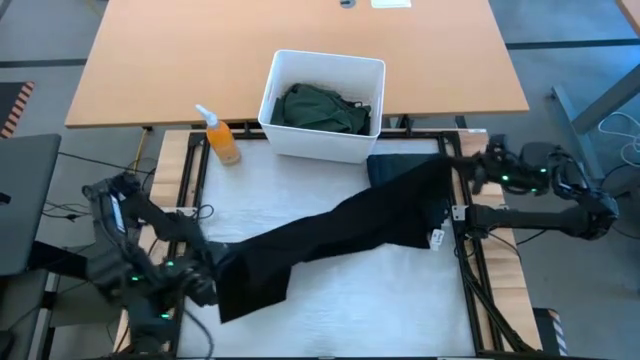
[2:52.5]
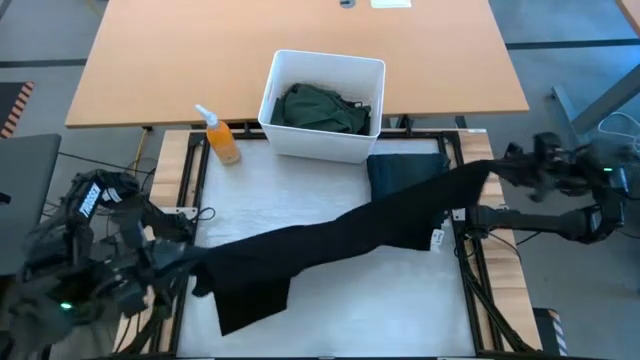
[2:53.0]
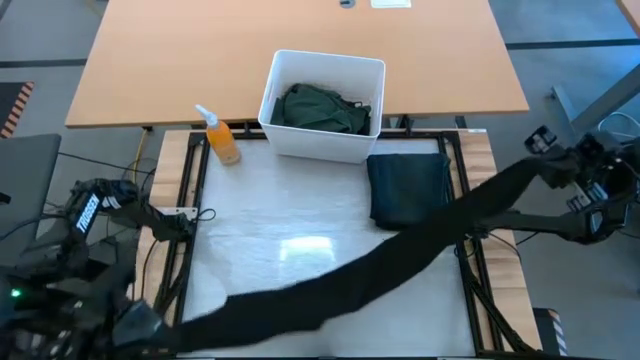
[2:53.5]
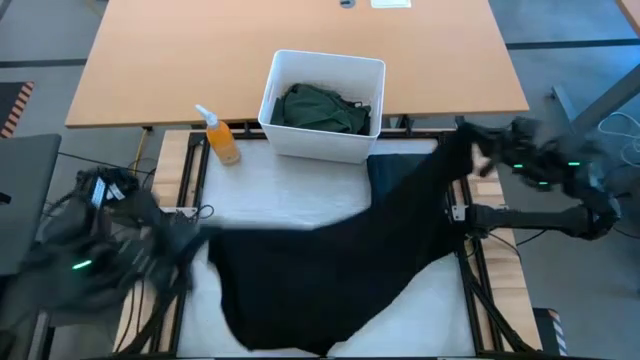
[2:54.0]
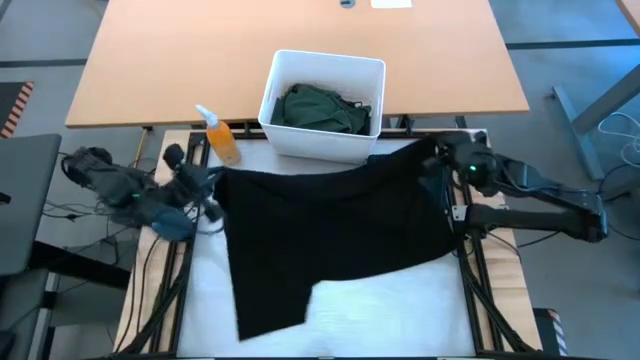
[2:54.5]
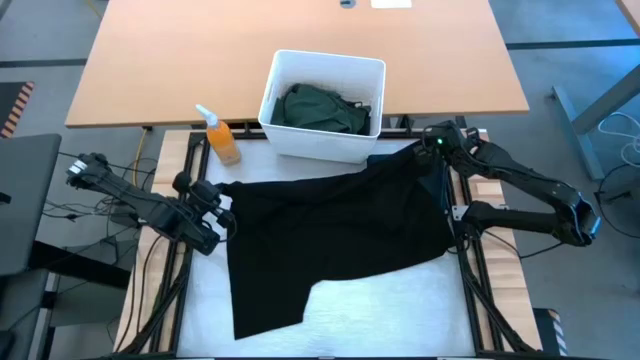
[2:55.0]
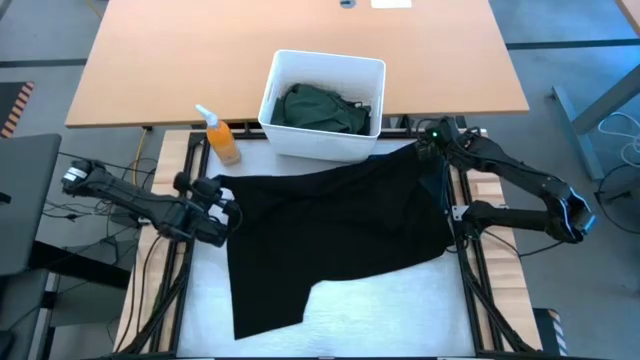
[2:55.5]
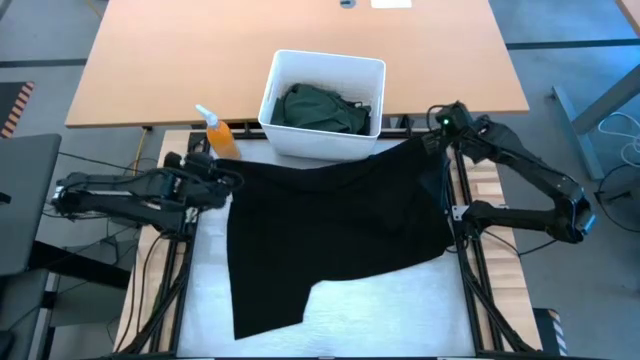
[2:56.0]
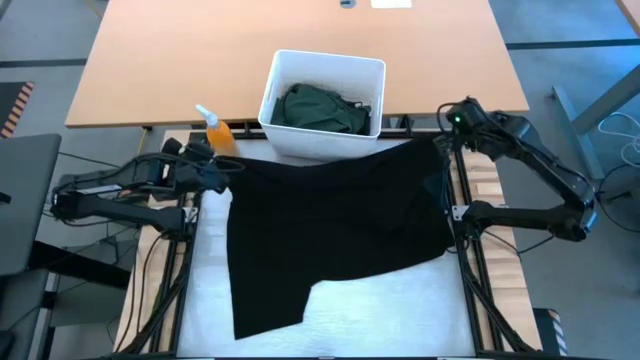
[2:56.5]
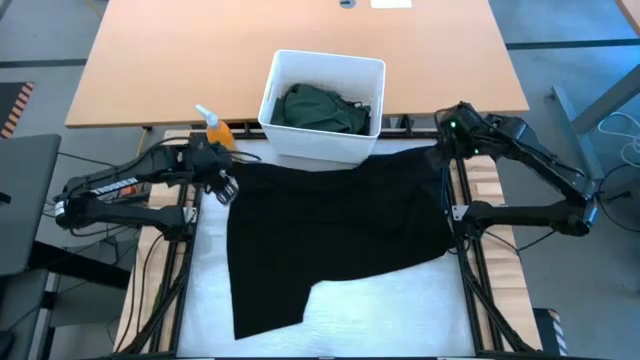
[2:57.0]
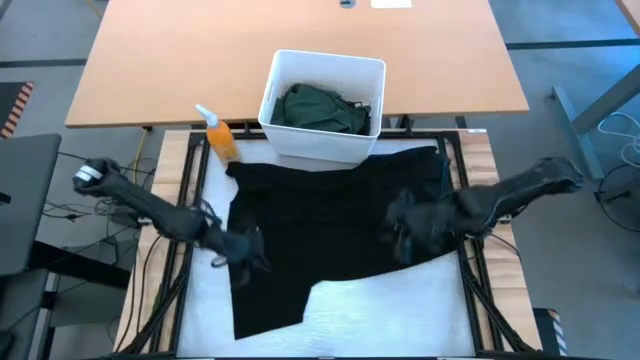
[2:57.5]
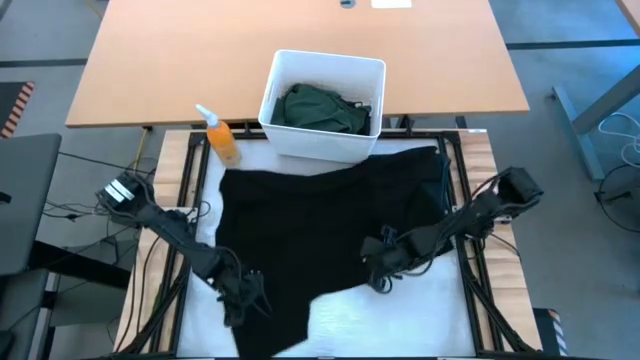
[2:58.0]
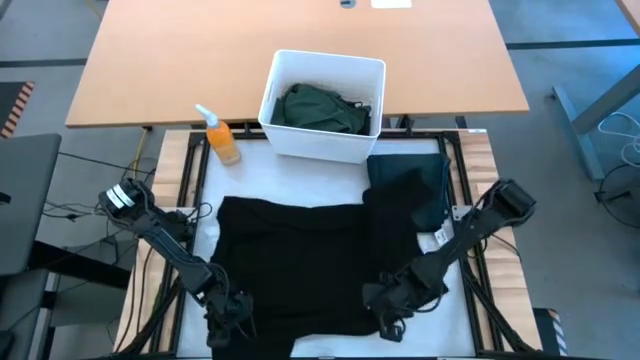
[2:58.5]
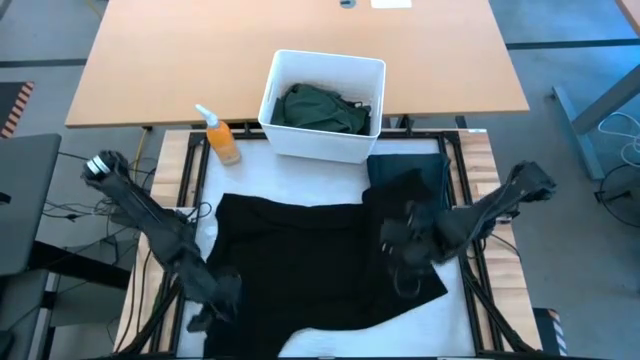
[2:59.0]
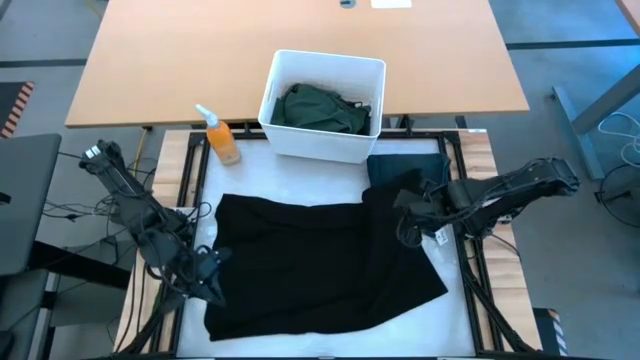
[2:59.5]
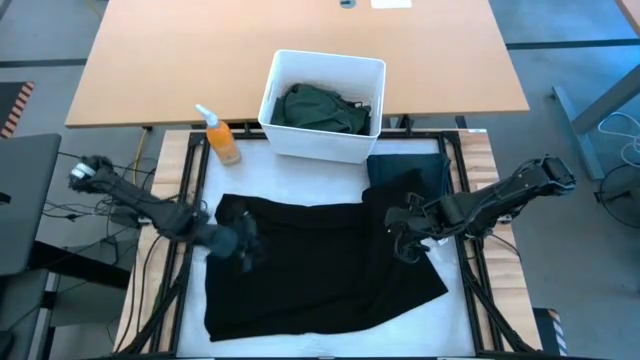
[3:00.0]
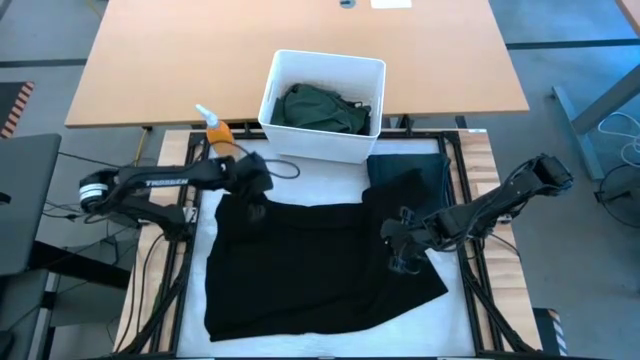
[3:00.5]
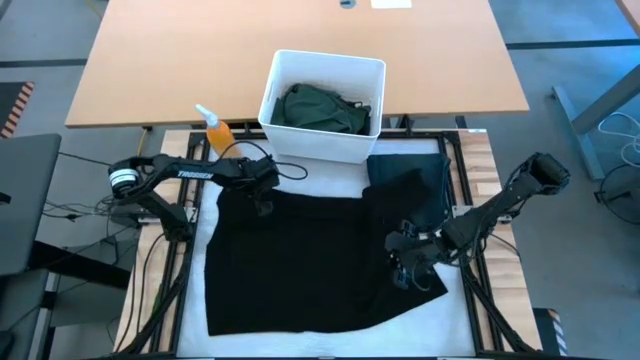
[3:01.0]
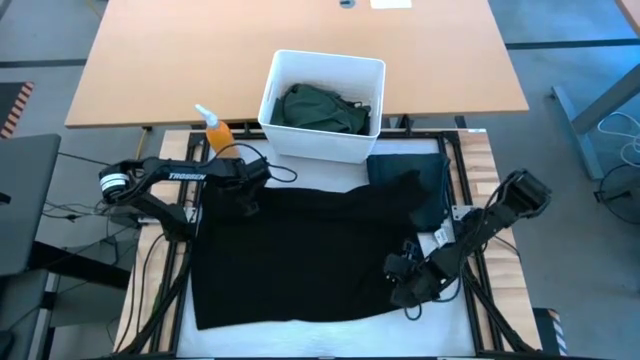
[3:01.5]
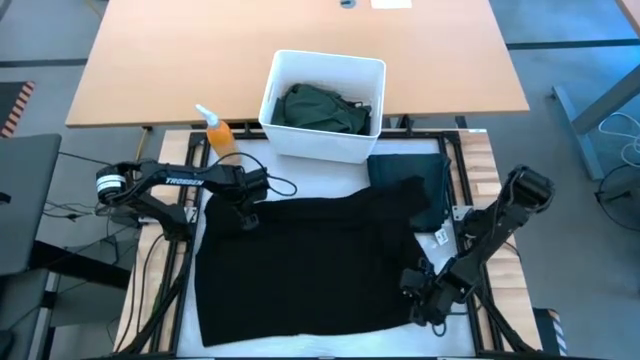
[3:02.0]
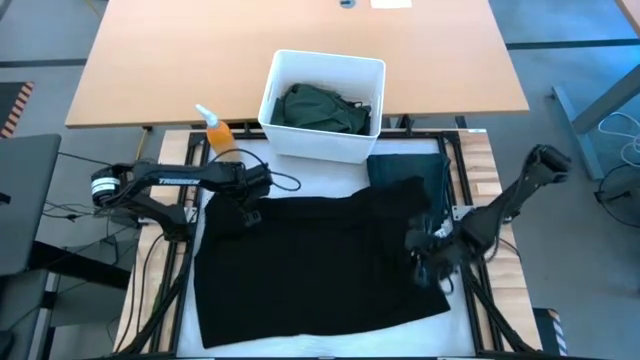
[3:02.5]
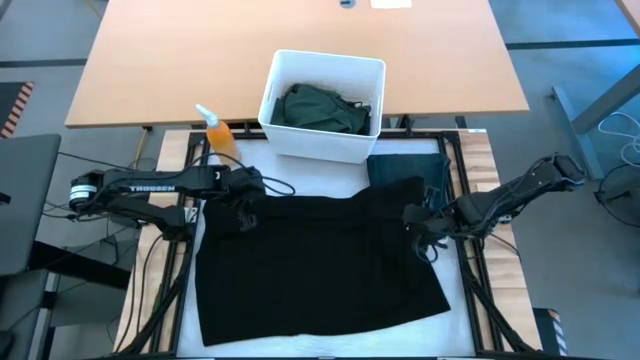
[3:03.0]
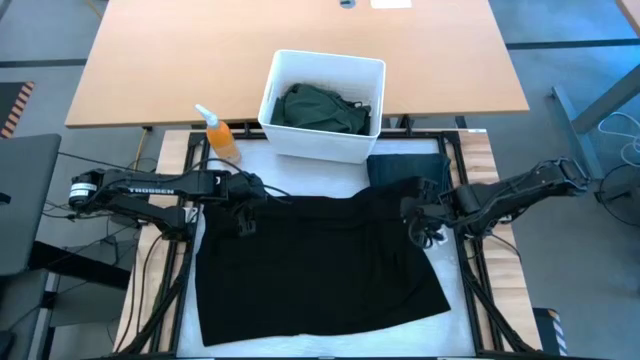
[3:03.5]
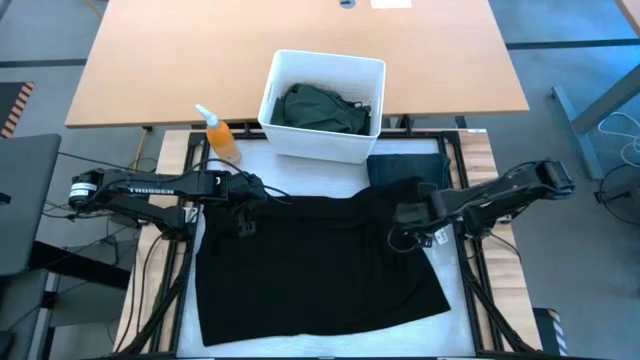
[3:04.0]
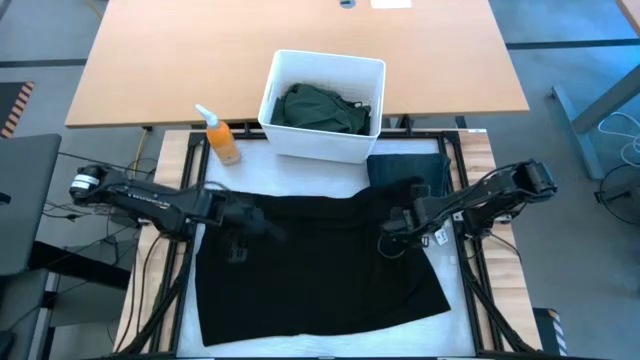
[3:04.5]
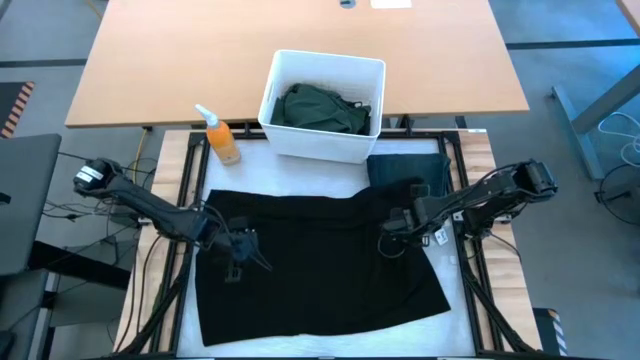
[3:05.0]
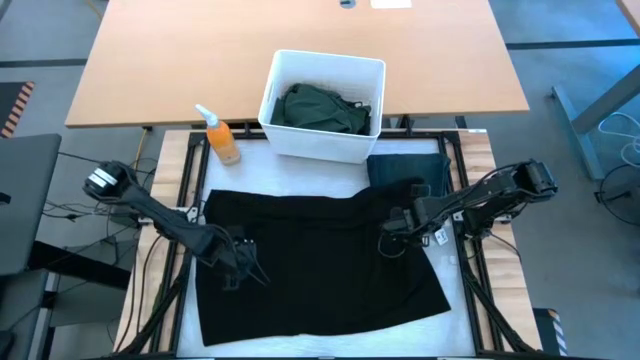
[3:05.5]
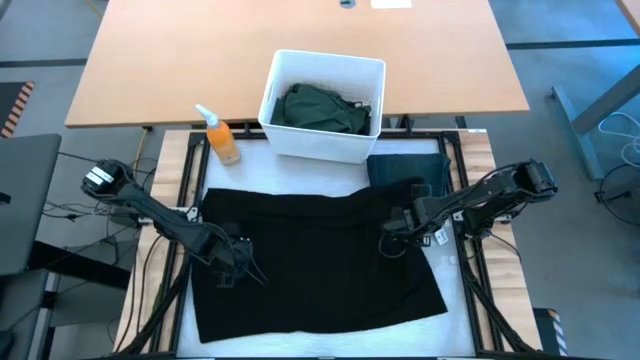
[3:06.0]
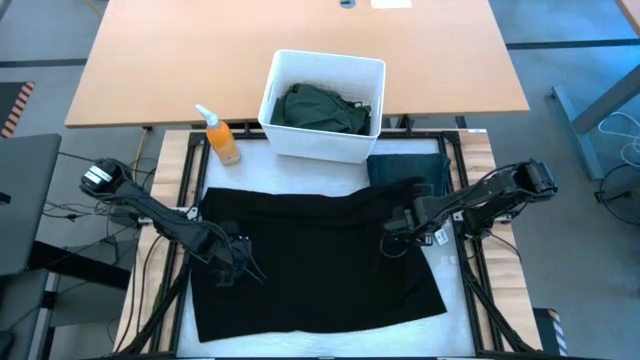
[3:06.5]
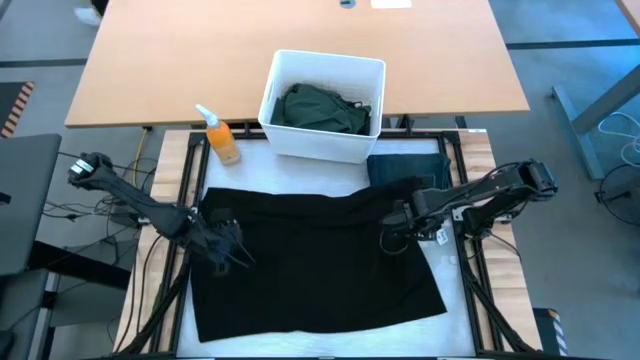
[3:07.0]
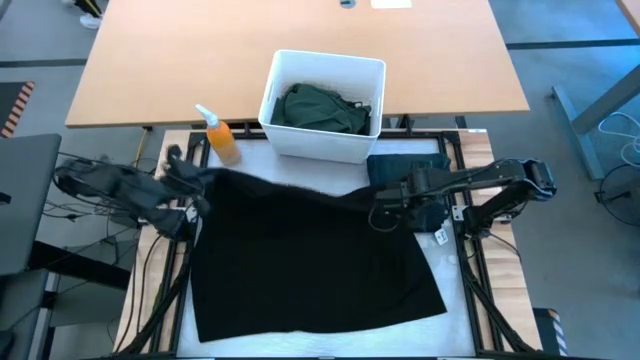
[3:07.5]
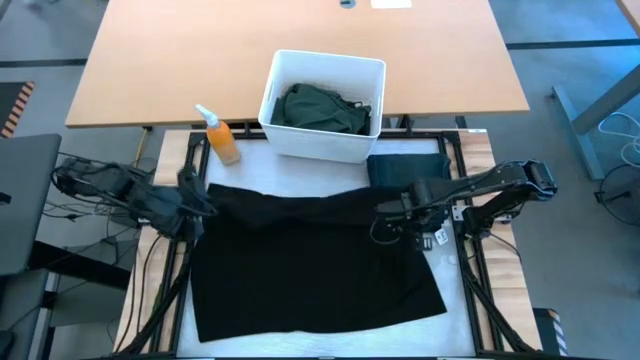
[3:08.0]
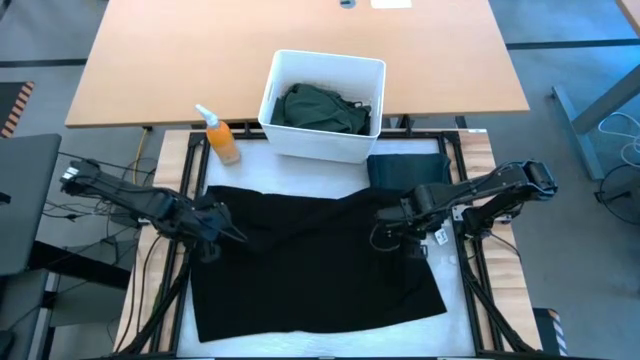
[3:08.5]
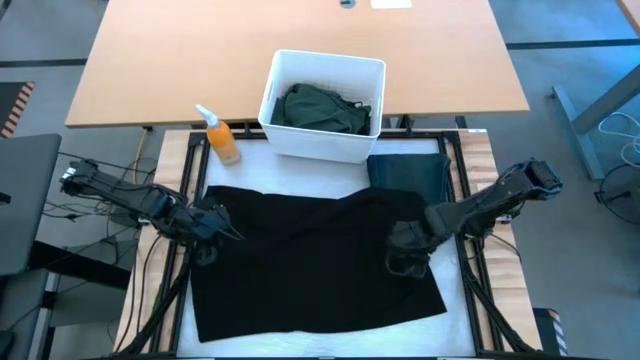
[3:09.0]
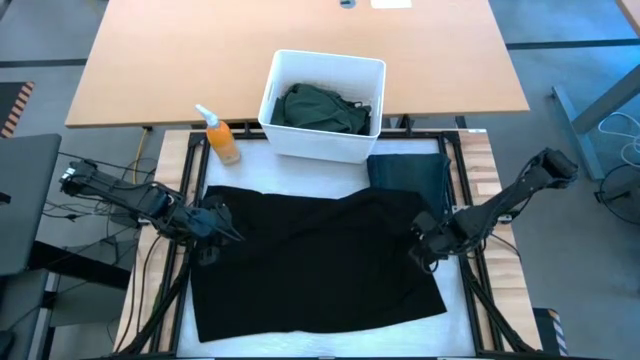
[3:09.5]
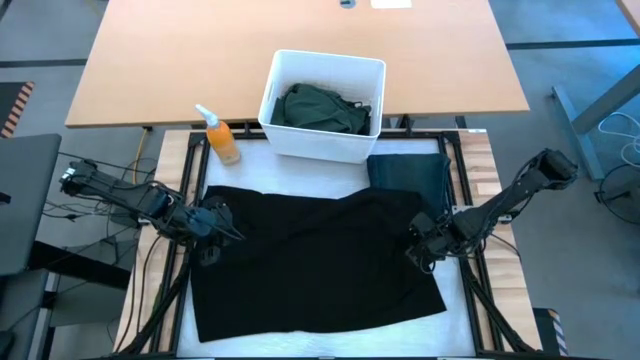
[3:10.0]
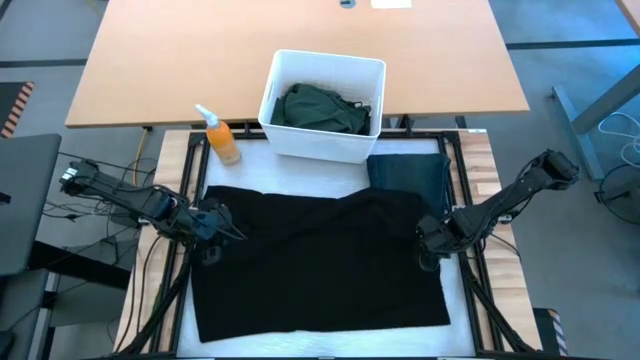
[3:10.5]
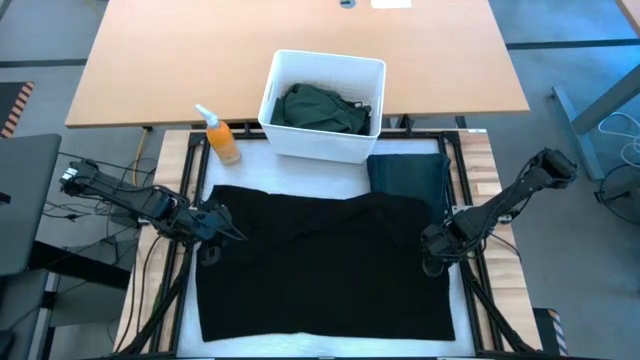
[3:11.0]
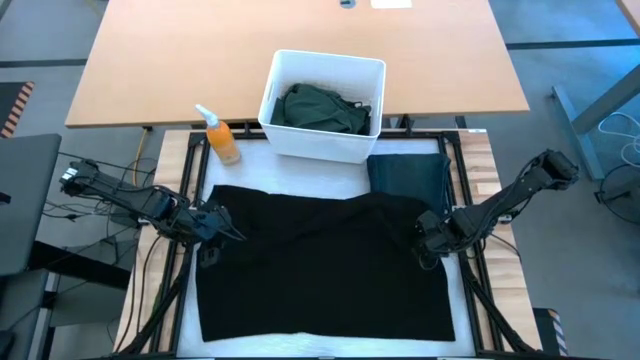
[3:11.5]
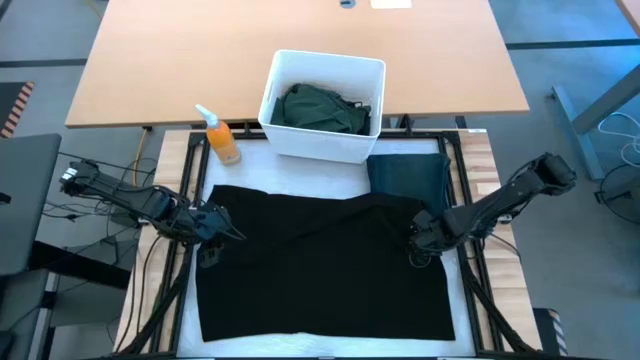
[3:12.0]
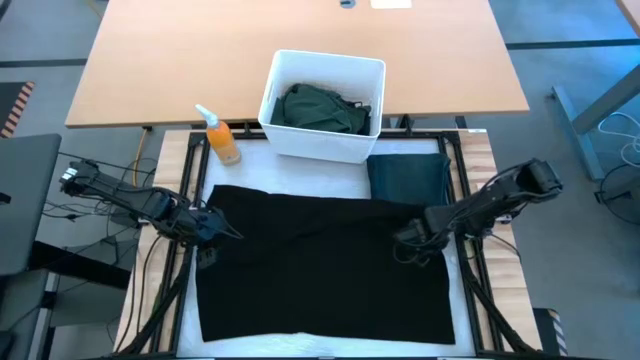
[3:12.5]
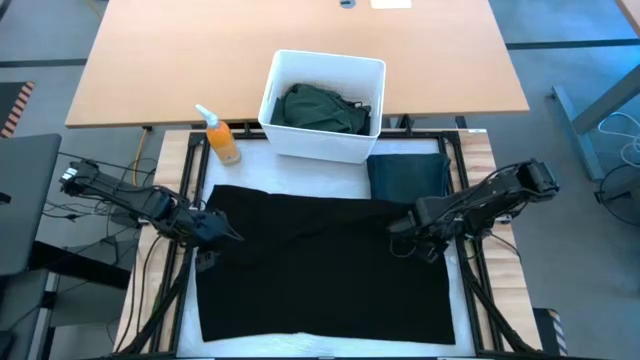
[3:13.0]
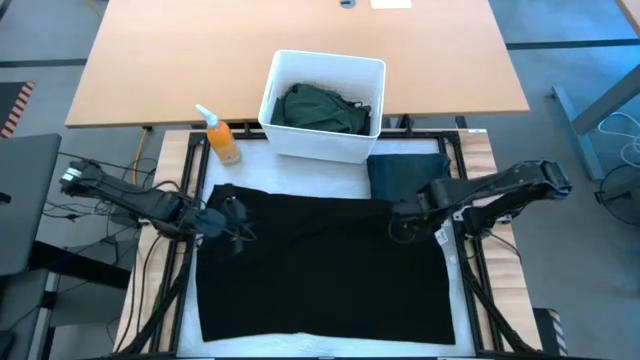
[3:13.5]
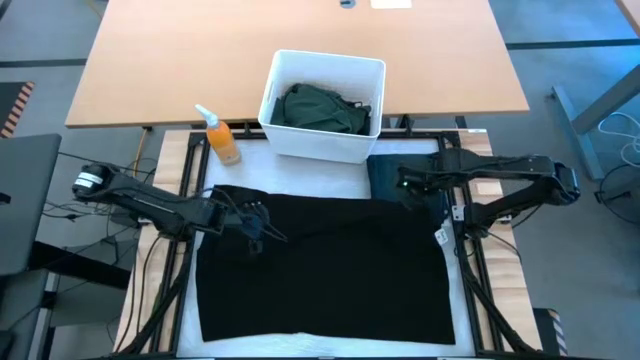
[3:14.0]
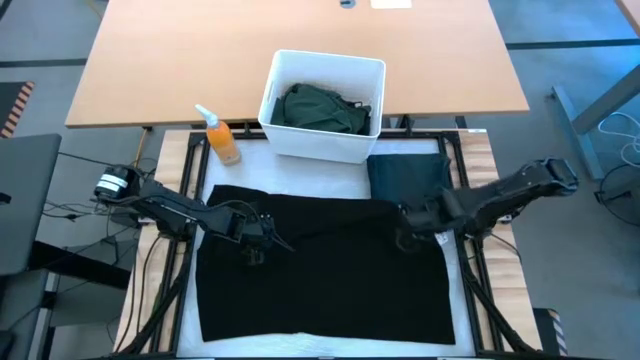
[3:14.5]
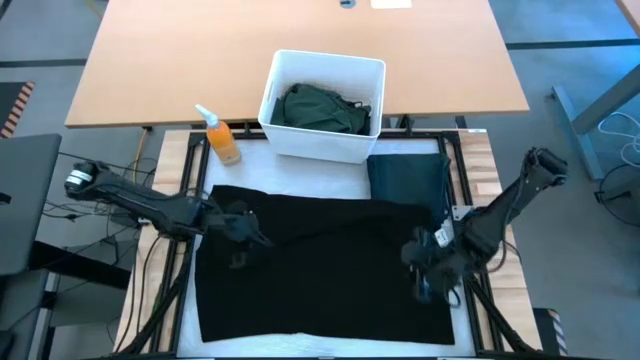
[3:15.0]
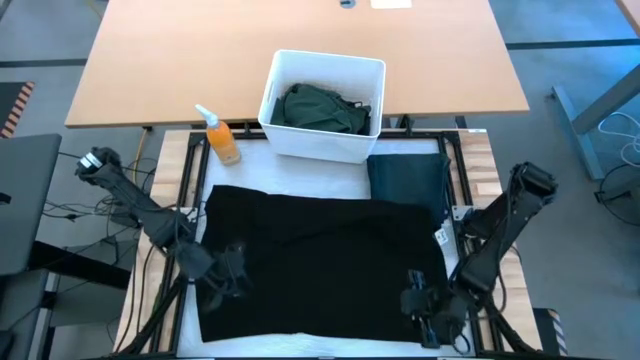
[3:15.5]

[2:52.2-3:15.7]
Task: Fold laundry
Fold the black t-shirt
